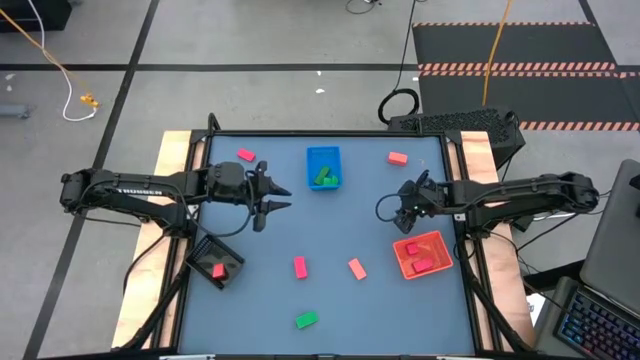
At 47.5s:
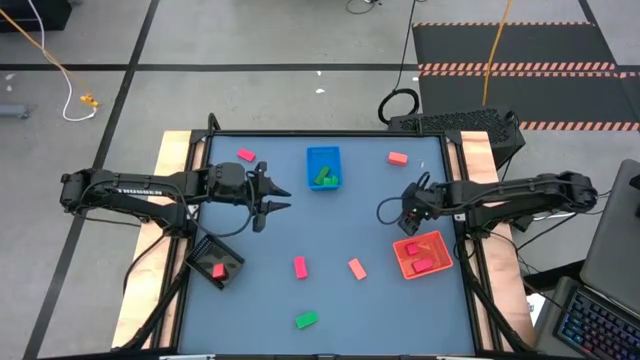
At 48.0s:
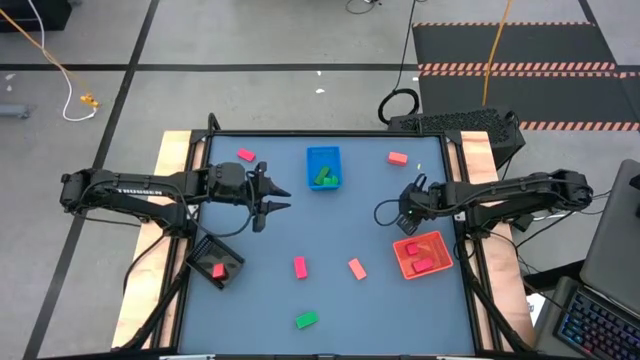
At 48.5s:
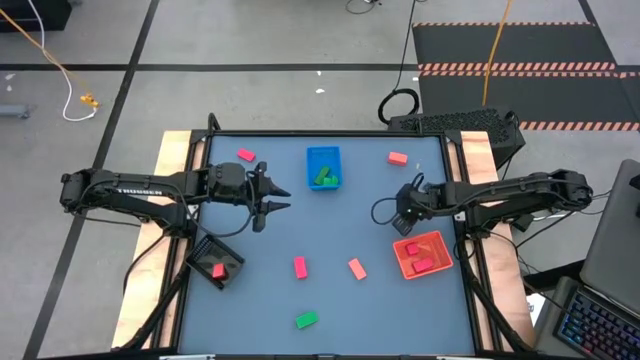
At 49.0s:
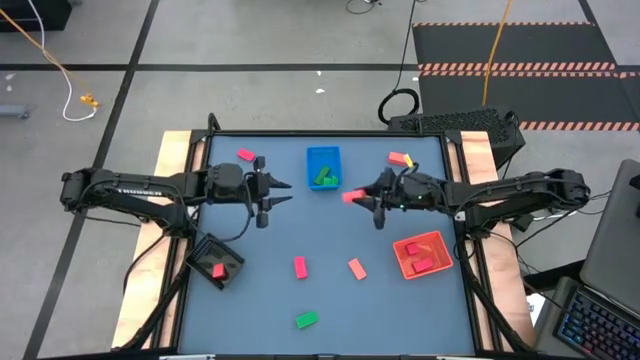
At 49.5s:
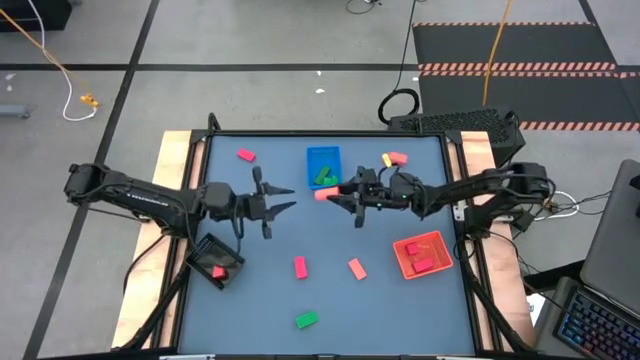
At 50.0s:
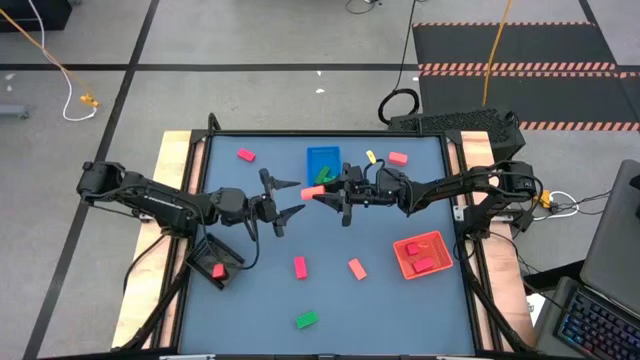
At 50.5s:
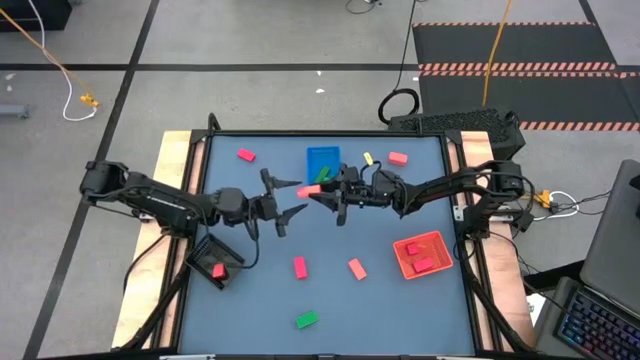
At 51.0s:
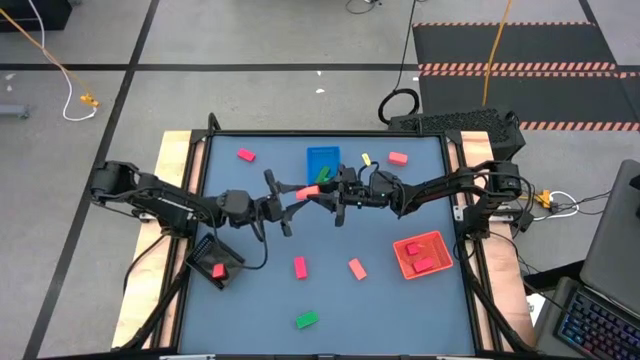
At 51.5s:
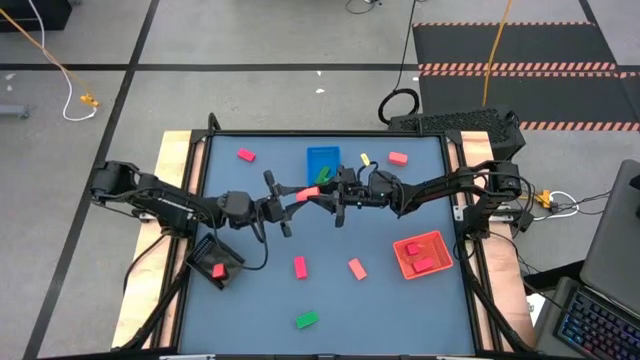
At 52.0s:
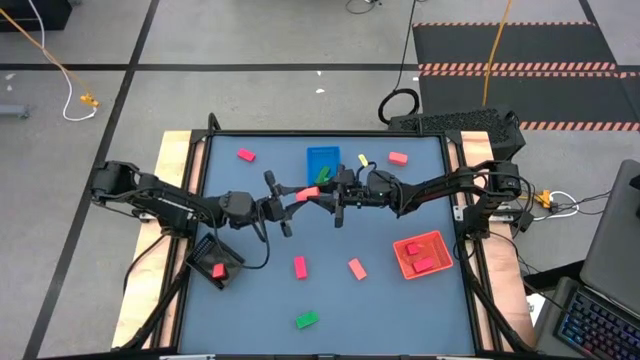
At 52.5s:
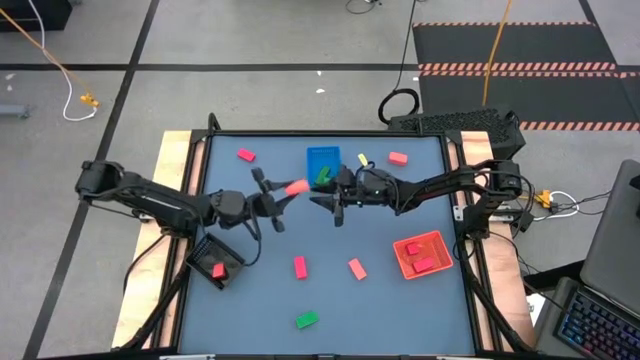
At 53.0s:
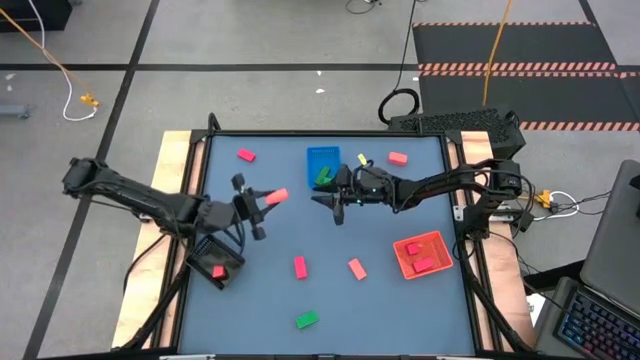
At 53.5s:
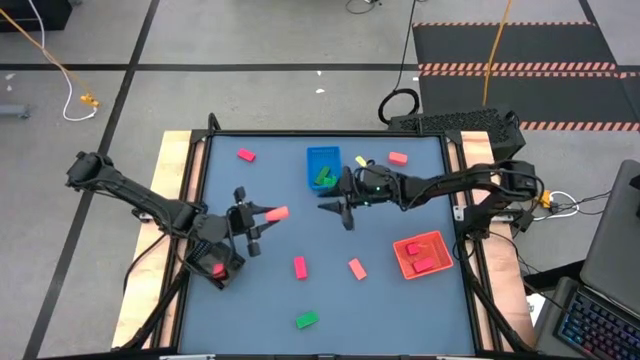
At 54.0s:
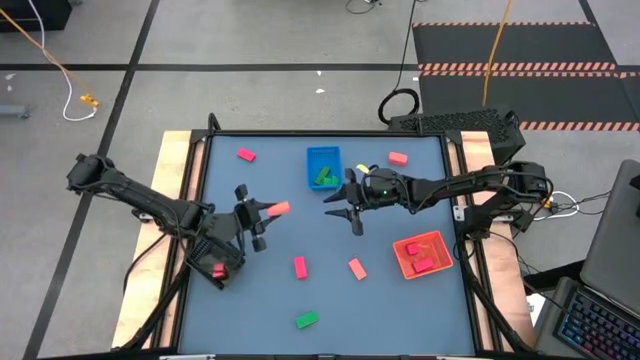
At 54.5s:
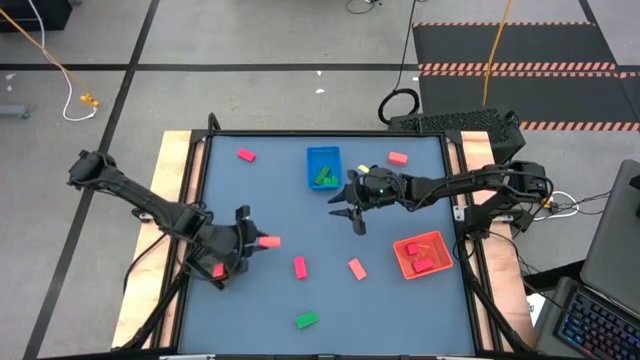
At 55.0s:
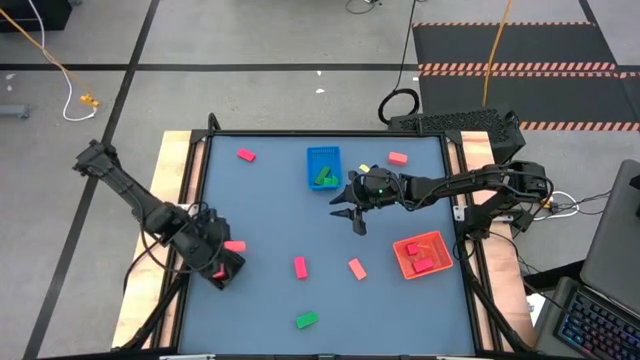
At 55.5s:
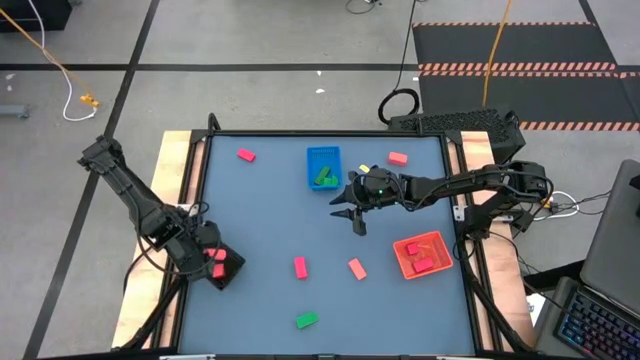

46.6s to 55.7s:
Task: Sort & place blocks by color
Put the orange block into the black bin

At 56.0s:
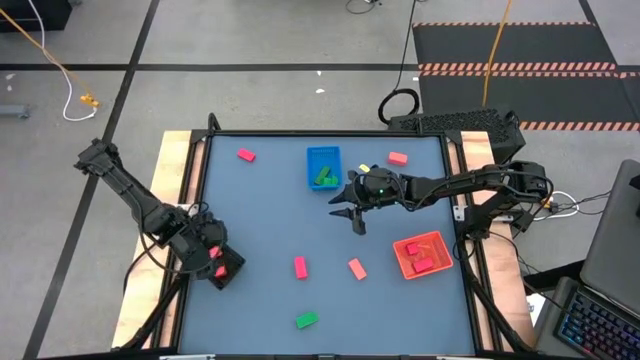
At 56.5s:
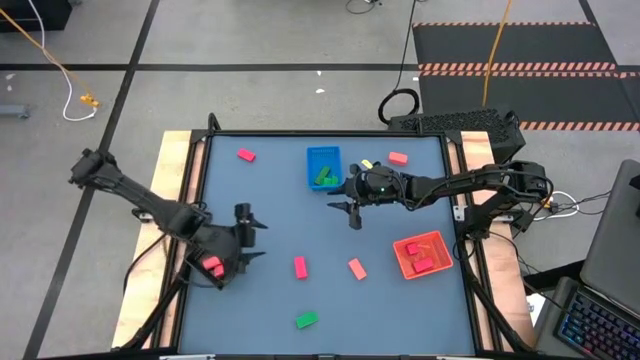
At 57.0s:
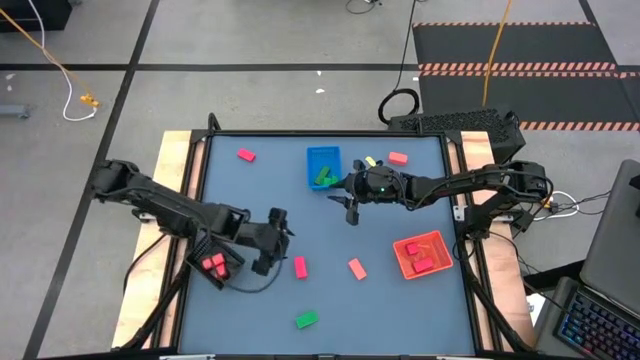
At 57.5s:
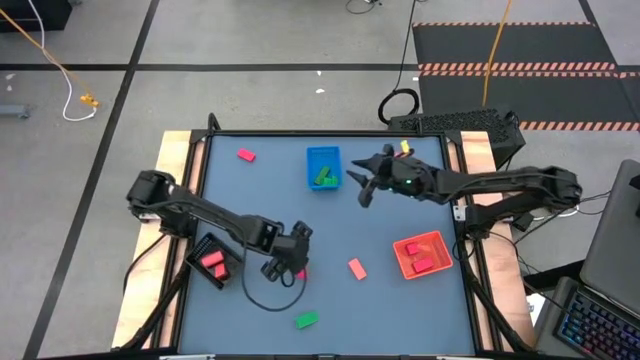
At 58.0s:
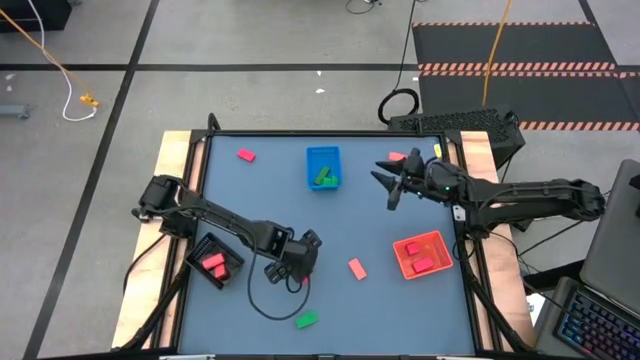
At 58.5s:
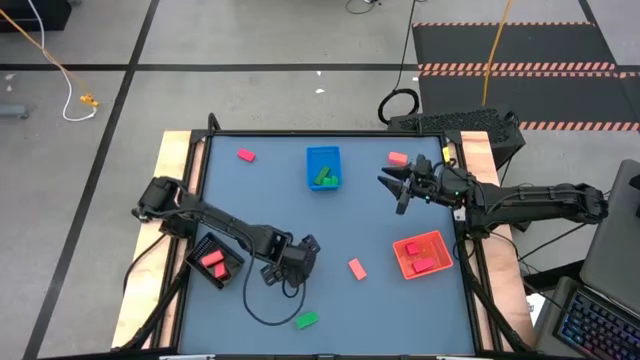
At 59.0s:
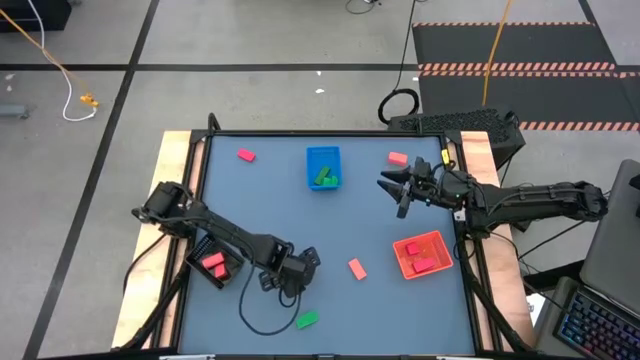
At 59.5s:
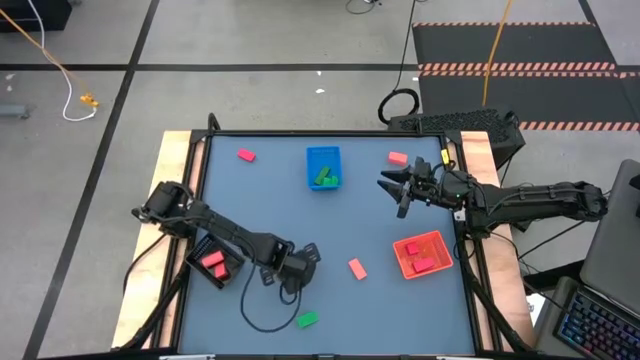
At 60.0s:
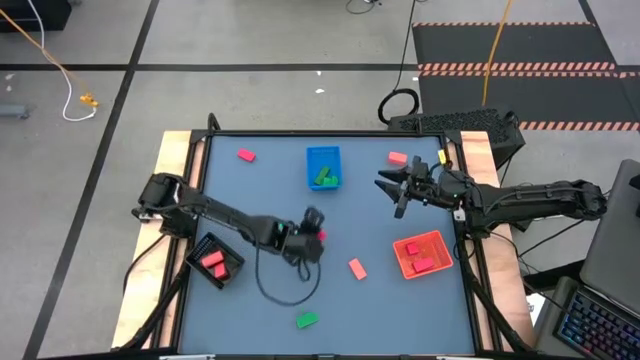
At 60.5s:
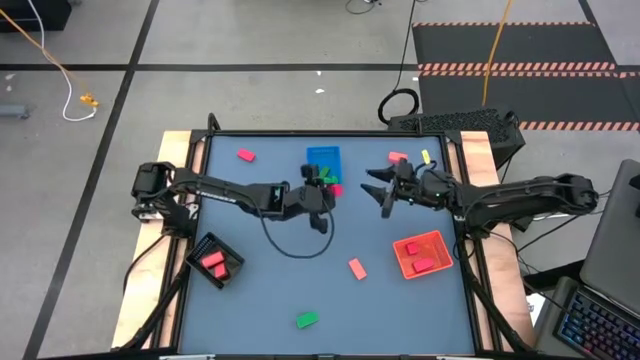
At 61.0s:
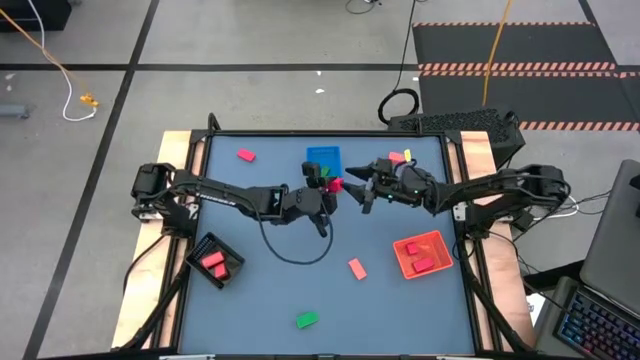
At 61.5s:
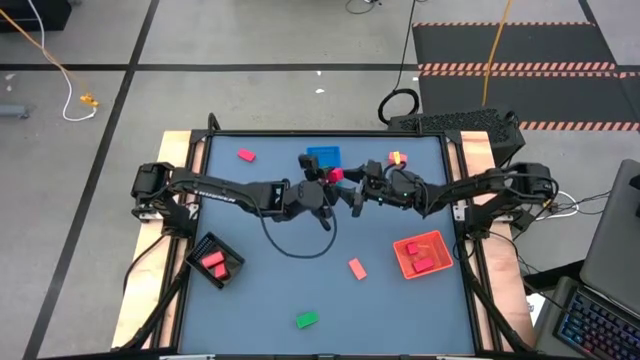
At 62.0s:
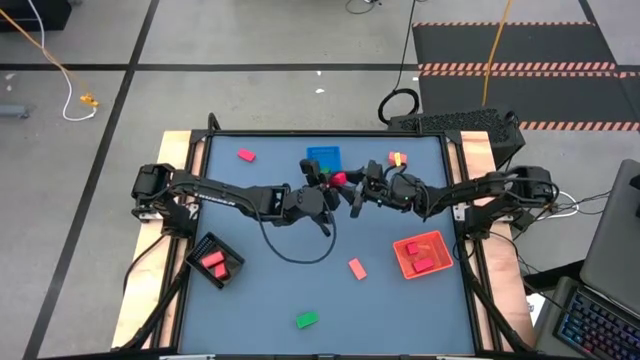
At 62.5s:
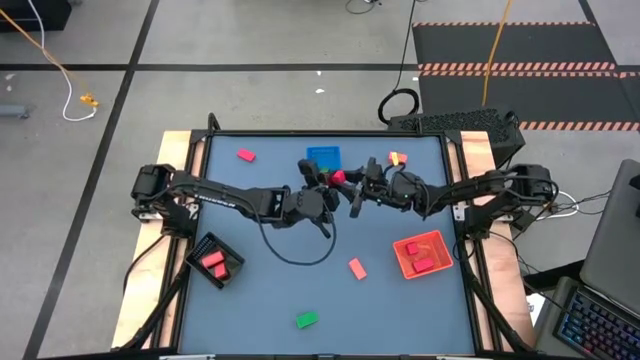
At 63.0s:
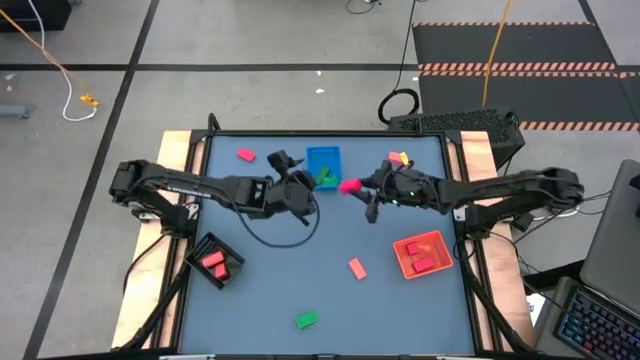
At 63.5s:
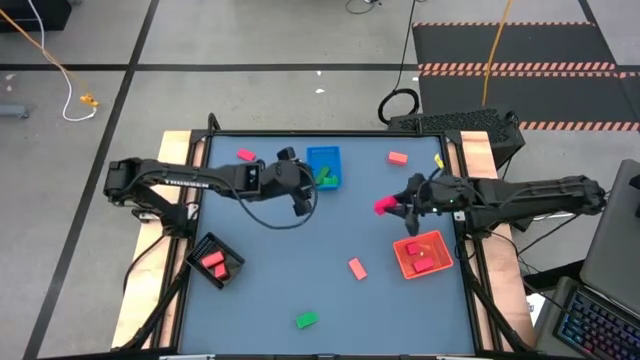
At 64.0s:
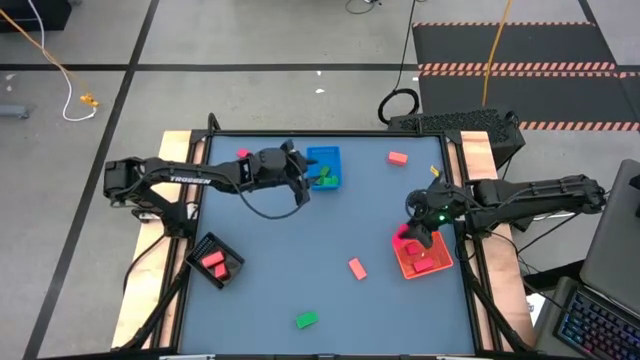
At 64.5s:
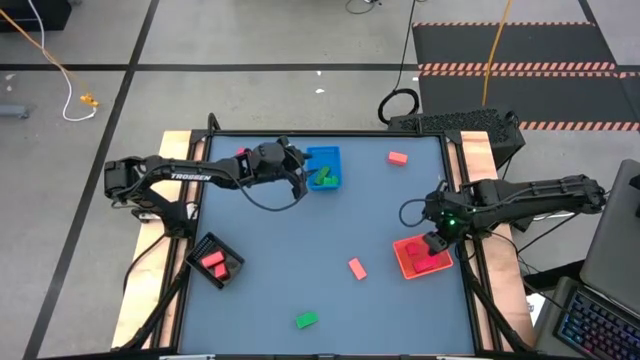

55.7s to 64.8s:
Put the red block into the orange bin

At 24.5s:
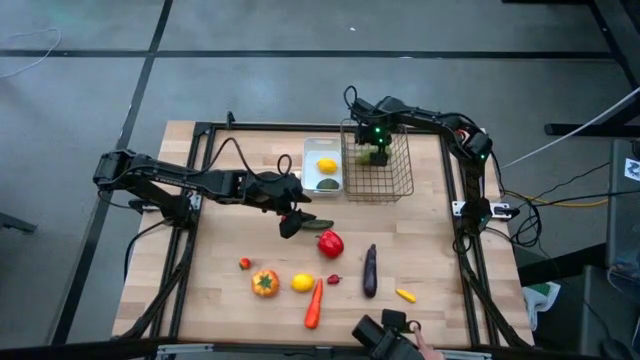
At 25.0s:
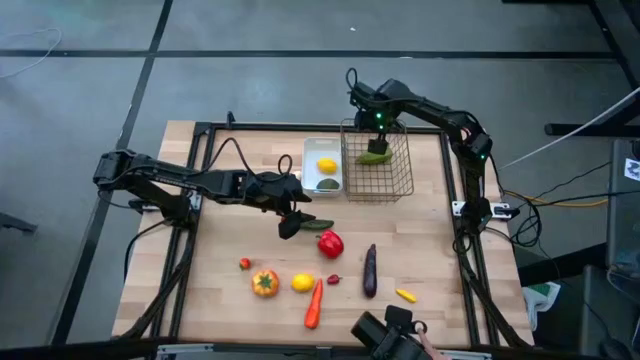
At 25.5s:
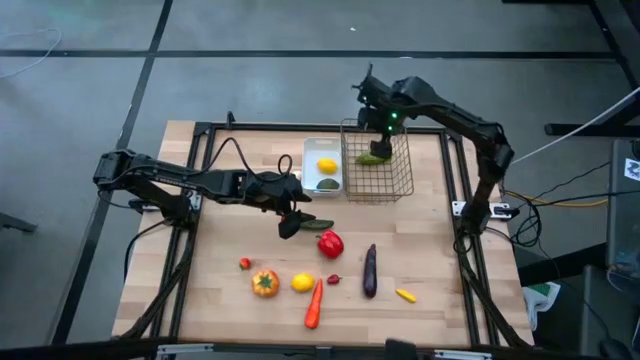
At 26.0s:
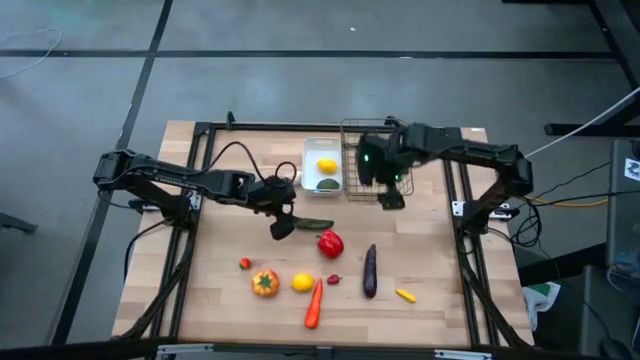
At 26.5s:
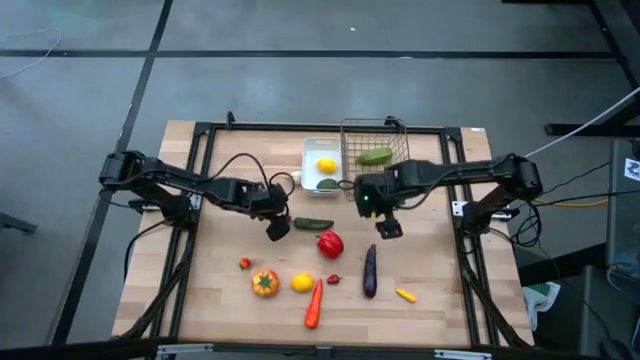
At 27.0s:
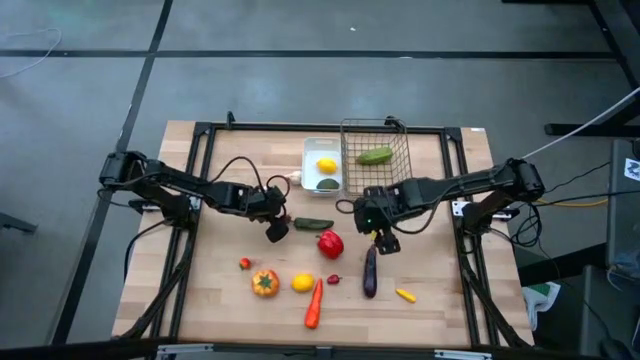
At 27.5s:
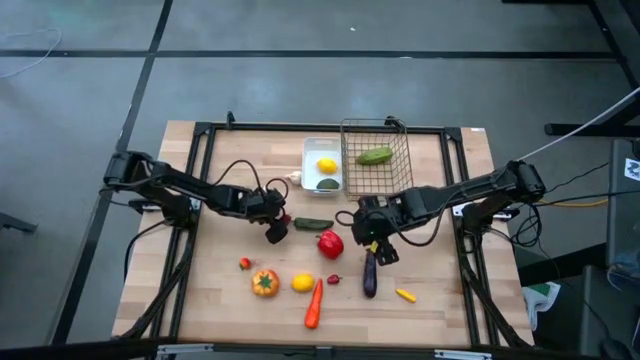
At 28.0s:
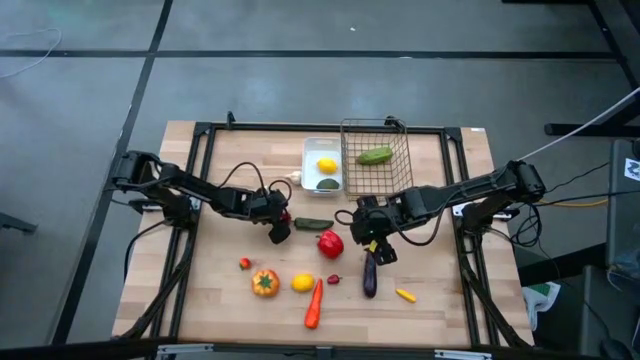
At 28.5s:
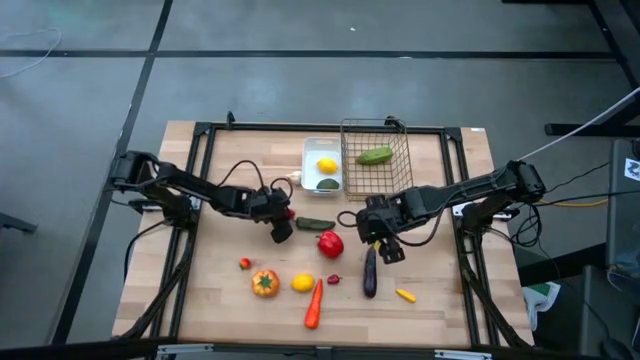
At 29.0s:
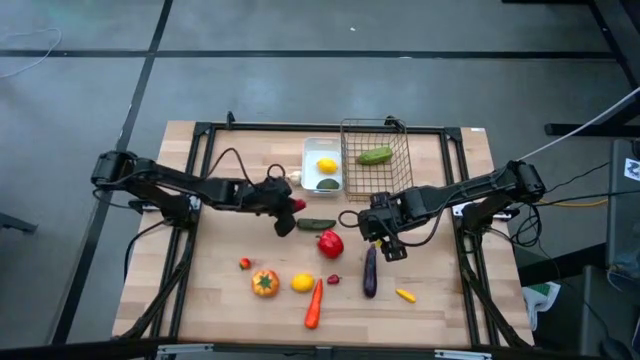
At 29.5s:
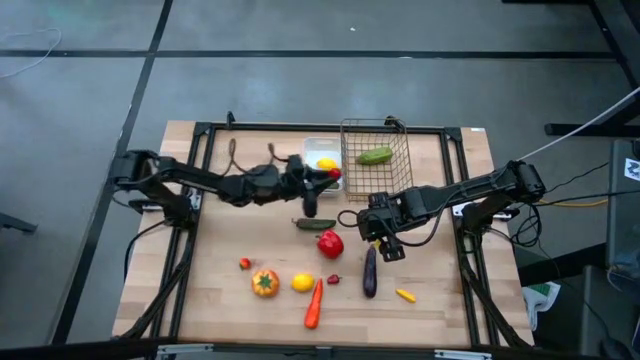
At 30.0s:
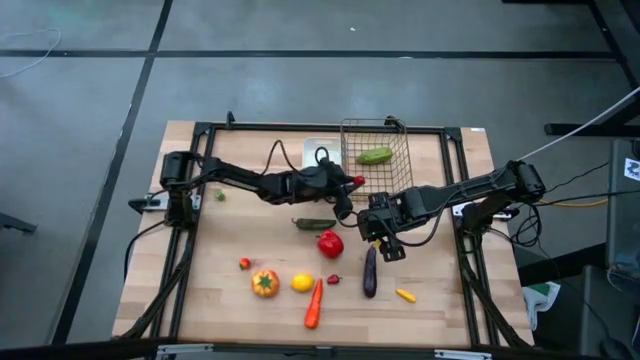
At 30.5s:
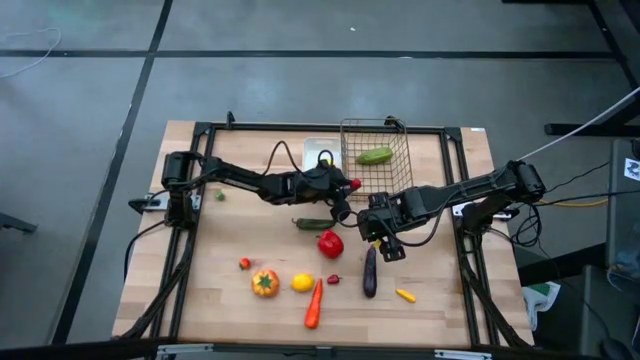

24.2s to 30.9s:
Task: Sort produce into baskets
Put the red bell pepper into the gold wire basket
